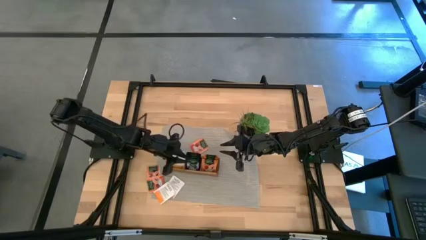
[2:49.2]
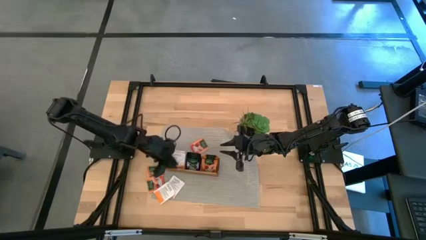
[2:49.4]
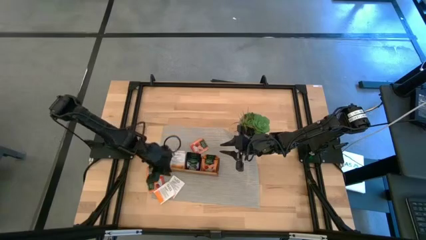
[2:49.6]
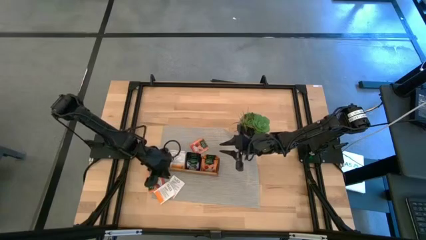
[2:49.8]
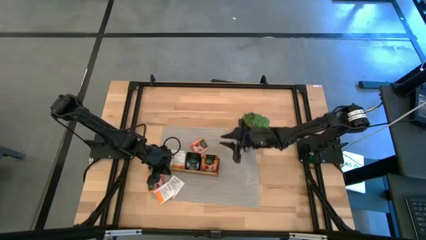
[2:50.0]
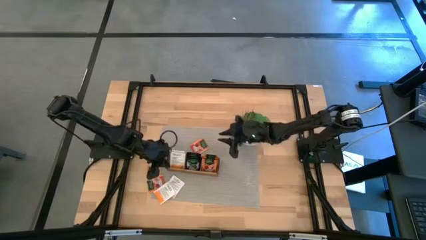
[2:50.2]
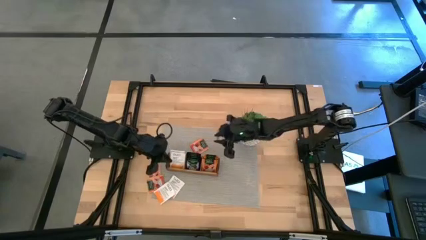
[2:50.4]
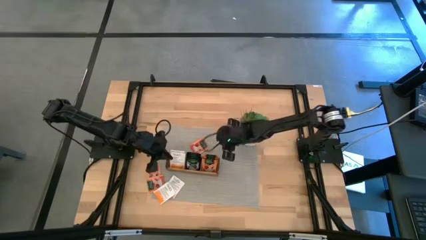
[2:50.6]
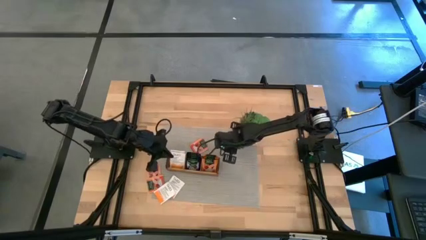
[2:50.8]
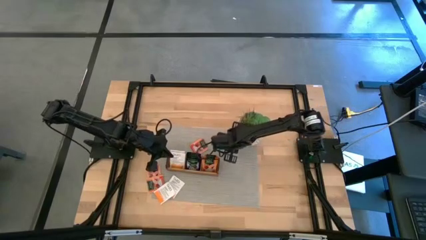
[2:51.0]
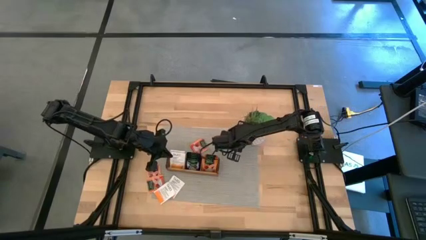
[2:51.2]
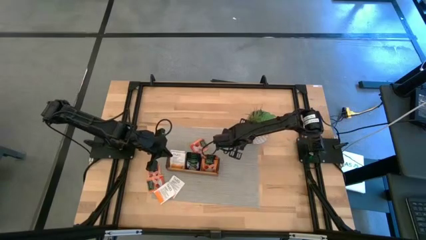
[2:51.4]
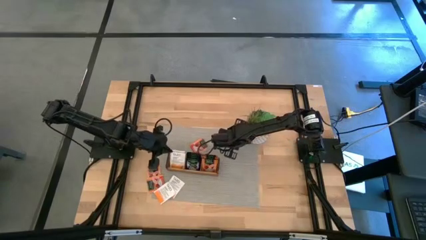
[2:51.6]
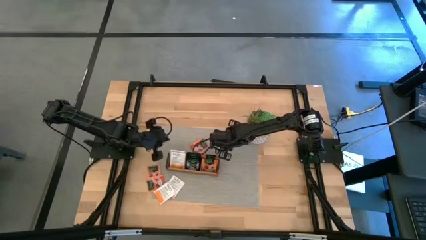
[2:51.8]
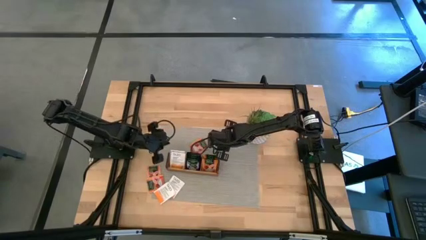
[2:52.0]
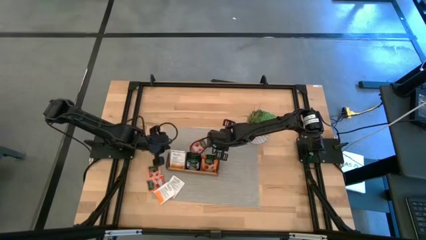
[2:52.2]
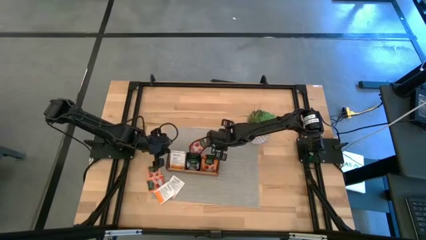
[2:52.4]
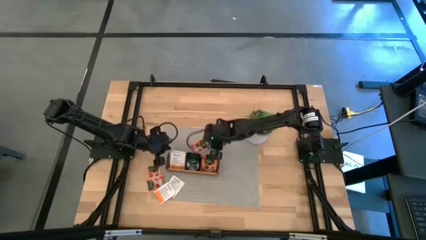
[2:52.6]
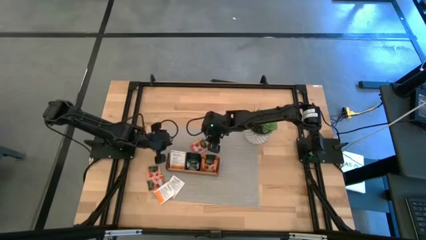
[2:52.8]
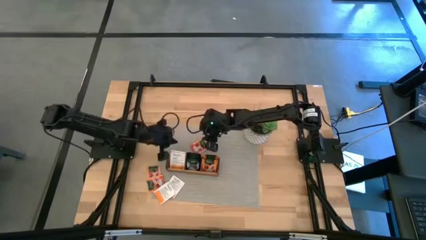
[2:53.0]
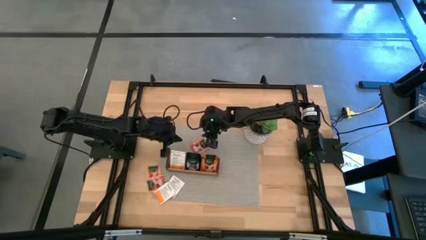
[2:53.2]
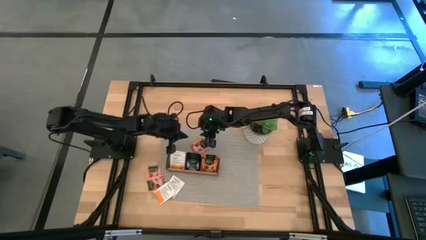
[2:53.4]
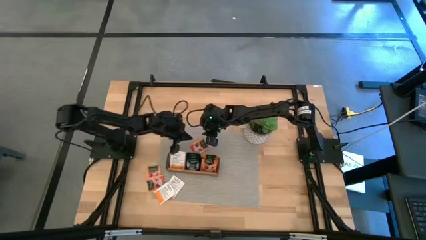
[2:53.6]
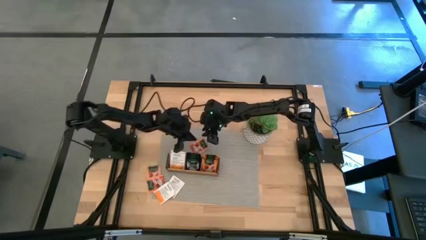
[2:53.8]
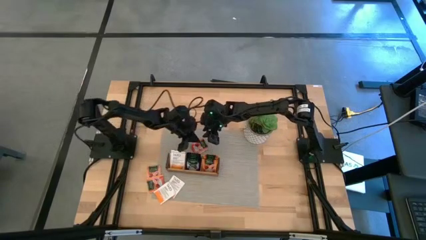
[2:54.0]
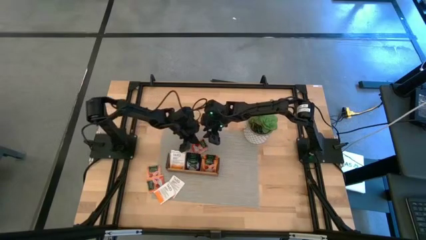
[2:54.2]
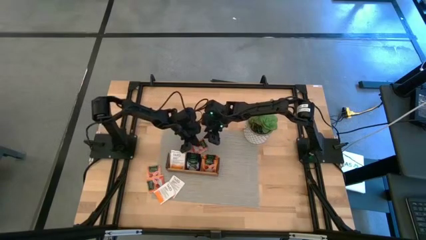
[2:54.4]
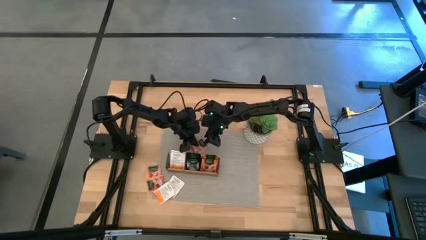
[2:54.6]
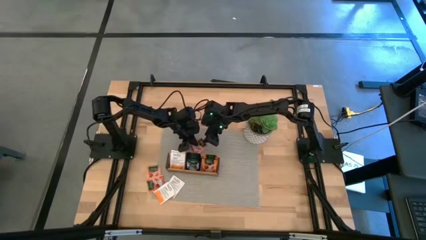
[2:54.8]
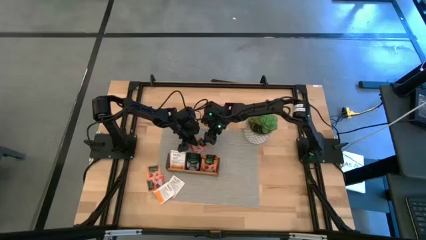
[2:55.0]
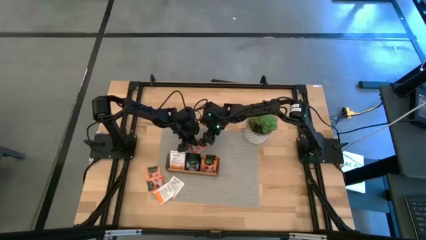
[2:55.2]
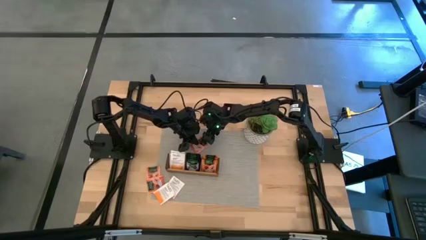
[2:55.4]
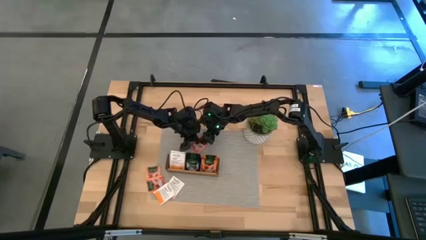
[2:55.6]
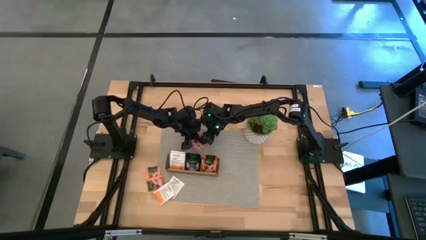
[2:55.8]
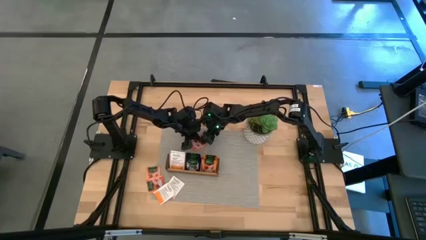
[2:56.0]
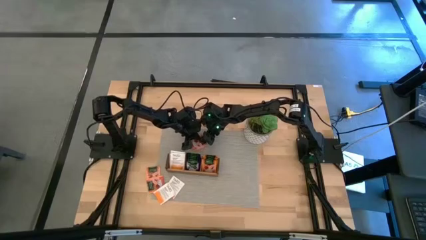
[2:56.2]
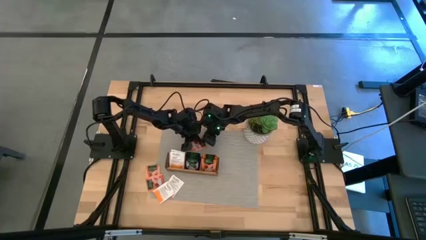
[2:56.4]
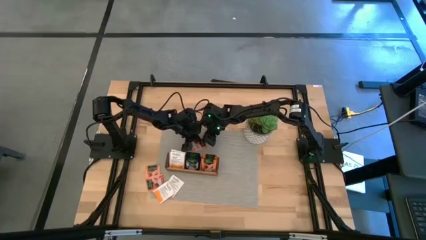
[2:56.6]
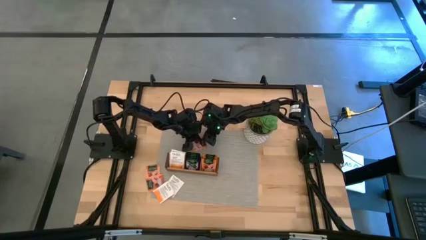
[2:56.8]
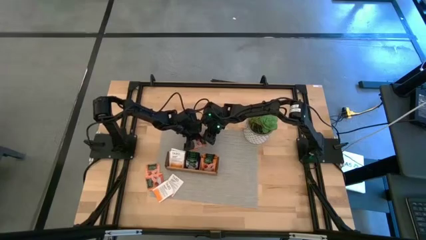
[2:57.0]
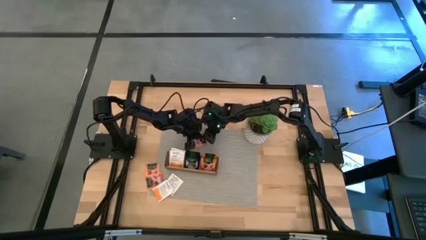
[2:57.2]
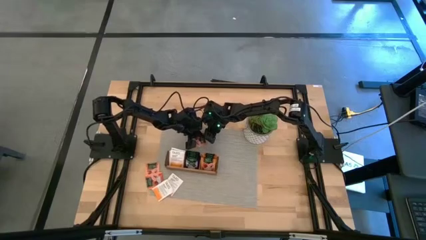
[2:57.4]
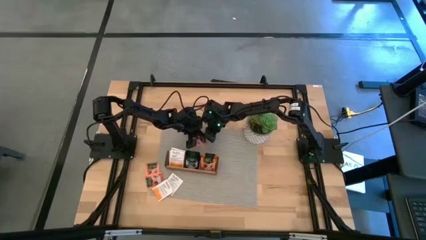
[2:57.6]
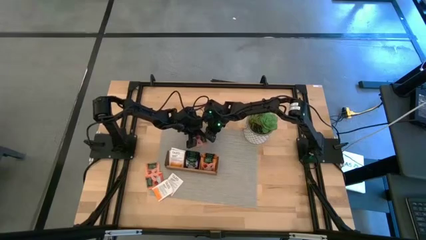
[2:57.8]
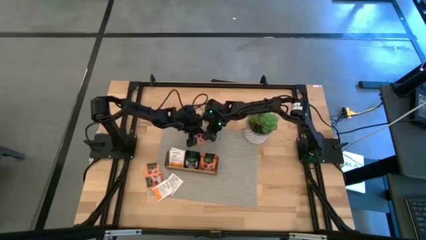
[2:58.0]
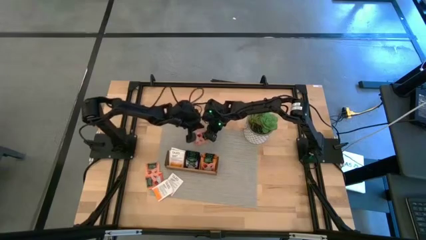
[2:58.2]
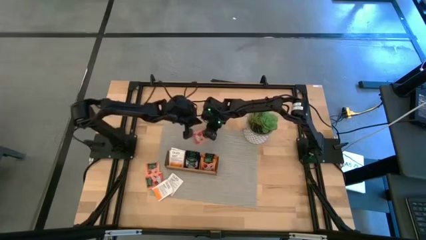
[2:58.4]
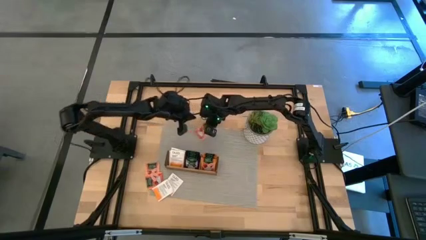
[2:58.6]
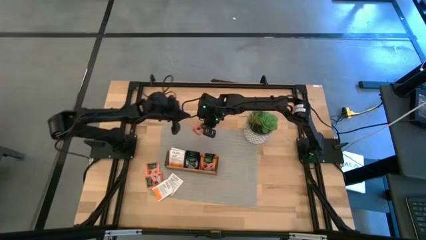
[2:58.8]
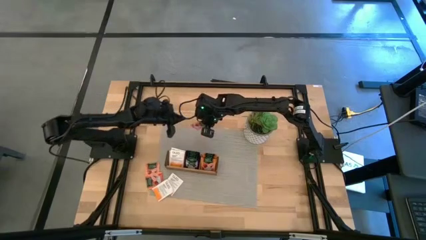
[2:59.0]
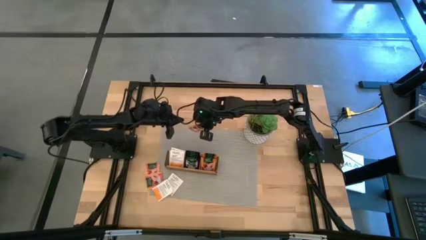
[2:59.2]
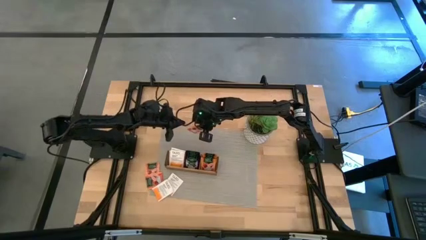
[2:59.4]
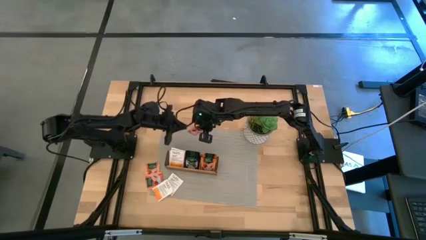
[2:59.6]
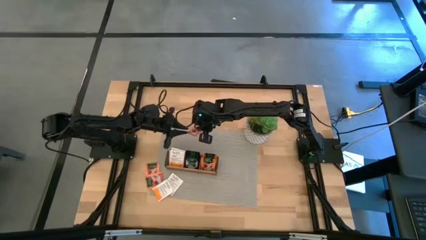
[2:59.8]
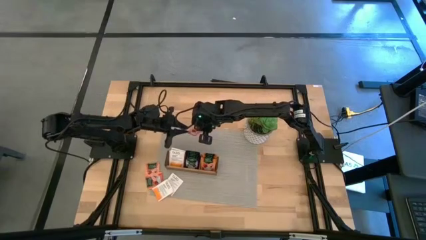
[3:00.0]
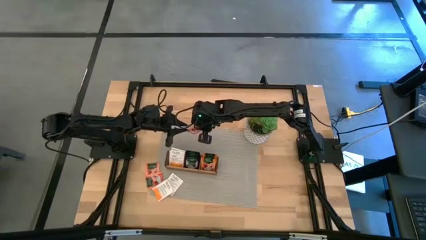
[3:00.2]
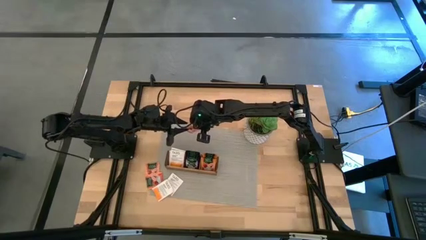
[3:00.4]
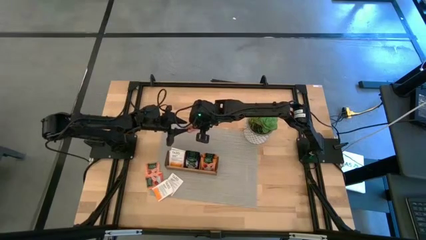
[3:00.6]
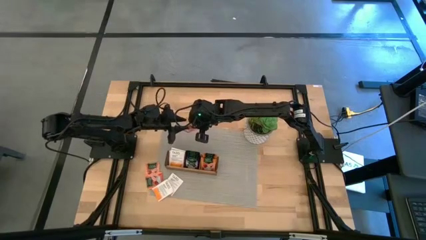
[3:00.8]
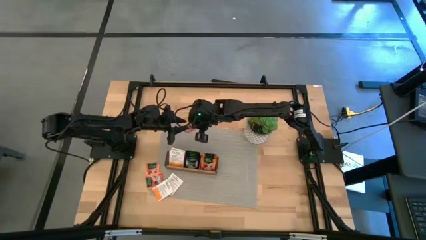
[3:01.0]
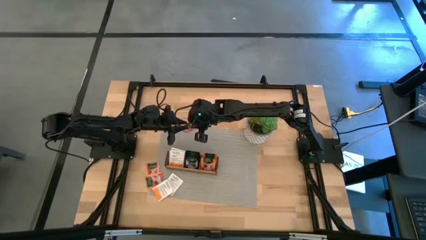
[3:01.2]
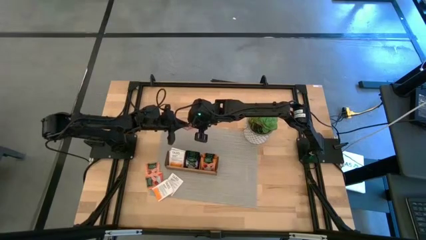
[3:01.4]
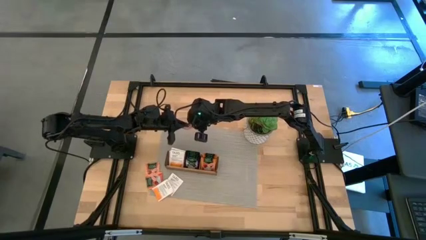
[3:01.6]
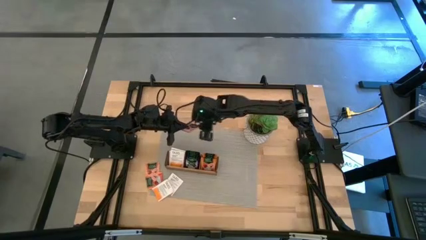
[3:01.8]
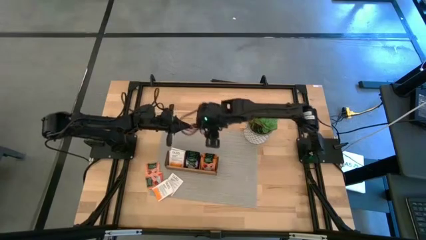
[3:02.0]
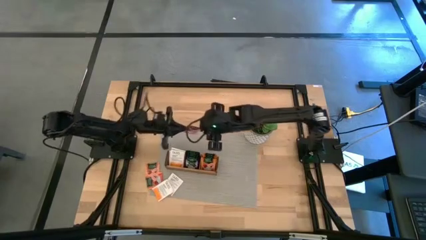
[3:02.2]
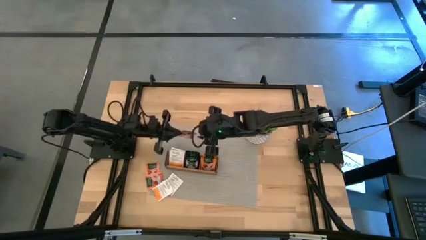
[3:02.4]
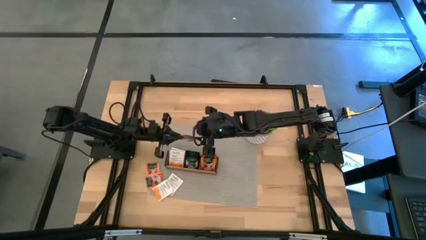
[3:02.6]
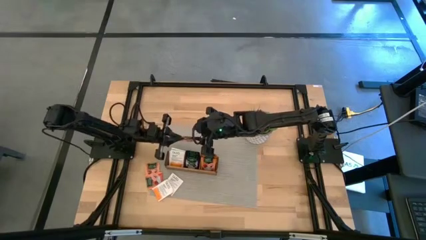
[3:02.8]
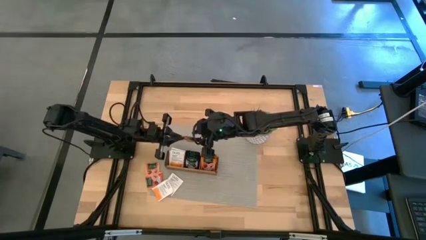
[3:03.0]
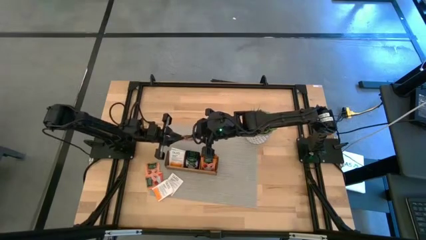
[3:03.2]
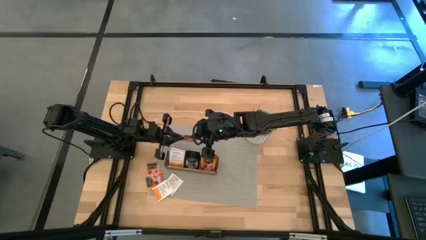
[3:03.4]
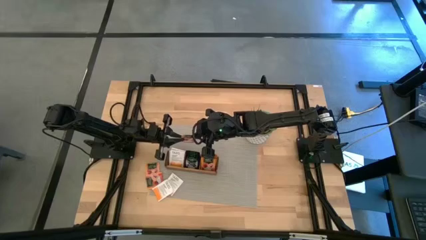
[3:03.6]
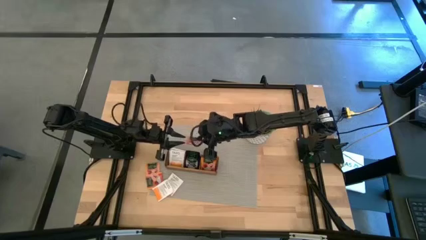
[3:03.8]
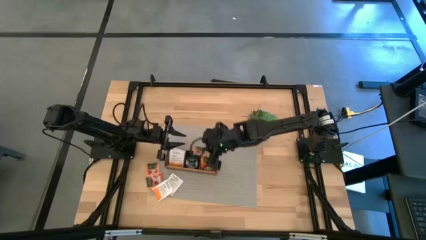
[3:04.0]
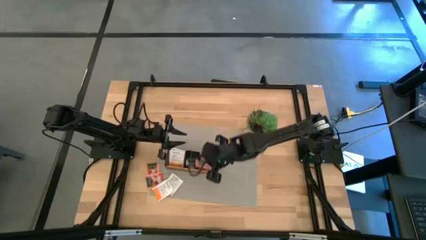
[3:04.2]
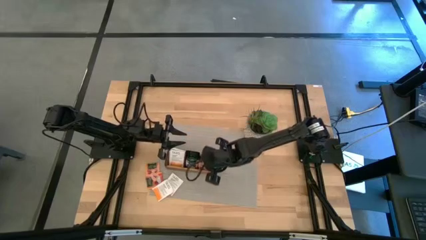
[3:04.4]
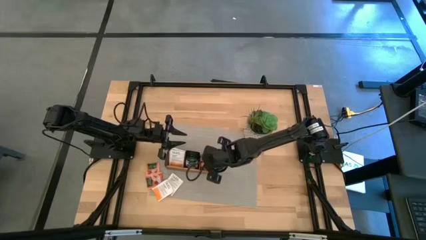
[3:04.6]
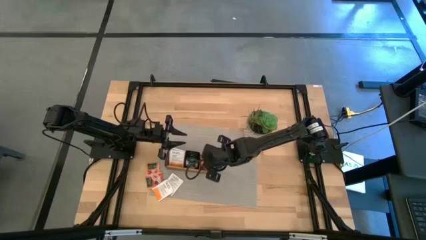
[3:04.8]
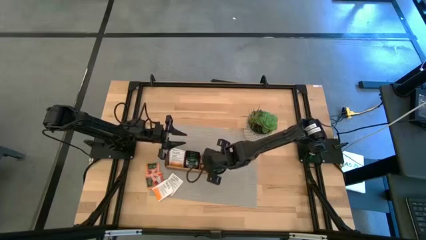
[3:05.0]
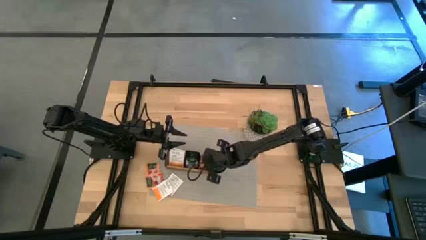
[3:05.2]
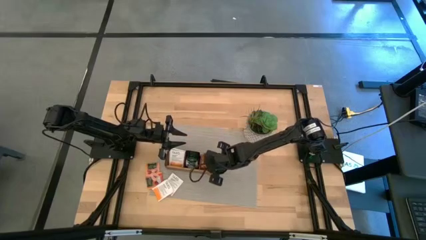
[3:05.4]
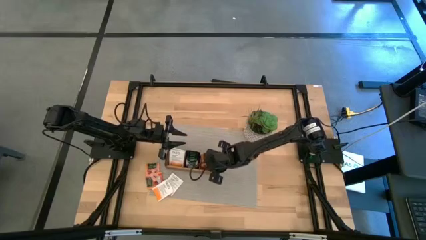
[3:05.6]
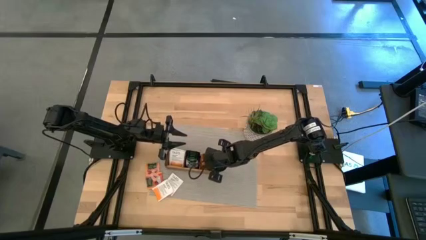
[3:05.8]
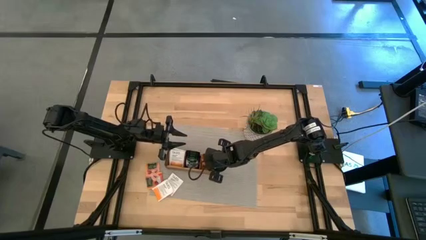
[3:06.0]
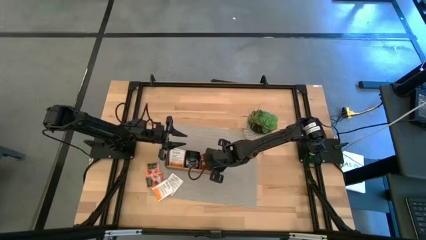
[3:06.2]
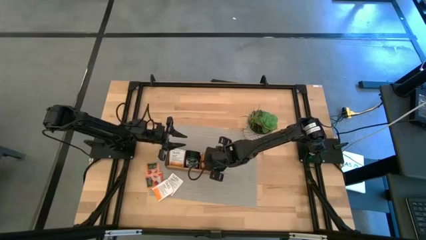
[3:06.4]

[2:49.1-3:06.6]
Task: Pick & Place Tea
Put the orange tea bag into the right section of the wooden organizer
